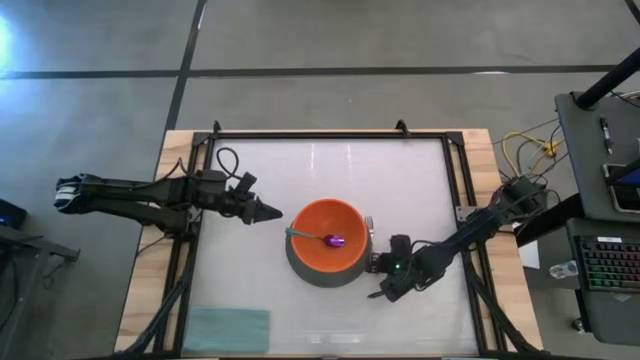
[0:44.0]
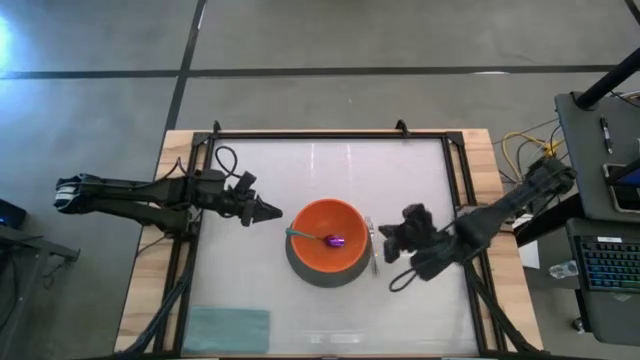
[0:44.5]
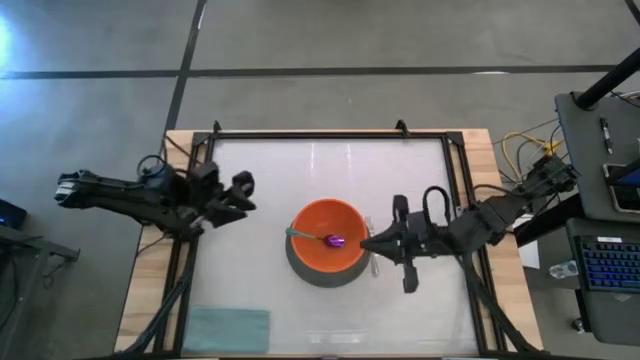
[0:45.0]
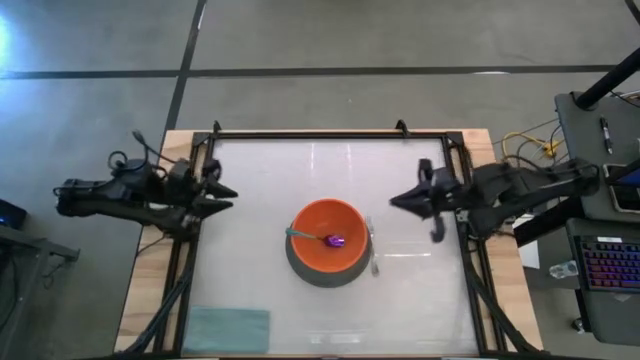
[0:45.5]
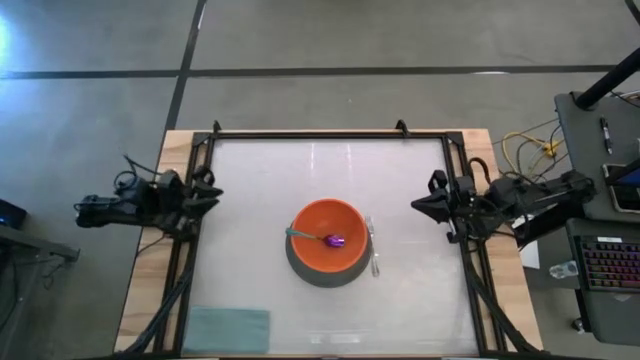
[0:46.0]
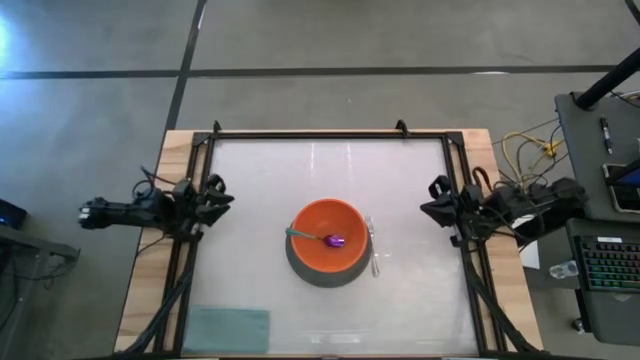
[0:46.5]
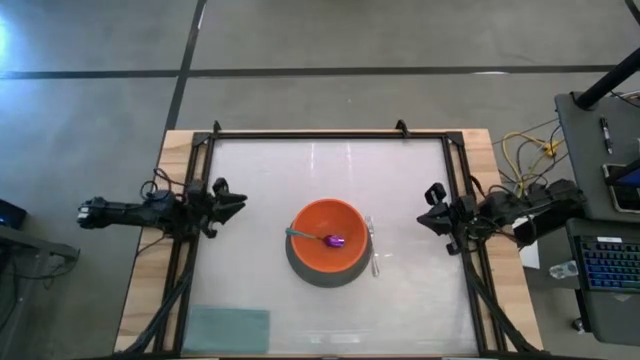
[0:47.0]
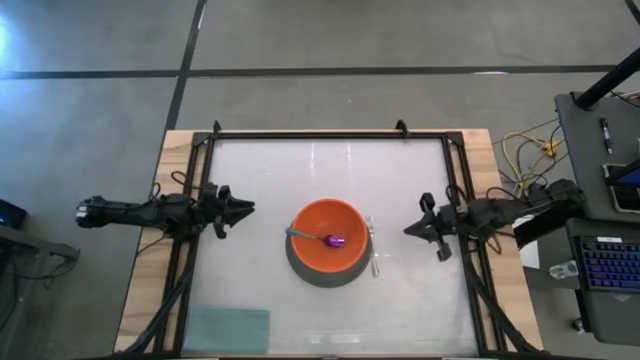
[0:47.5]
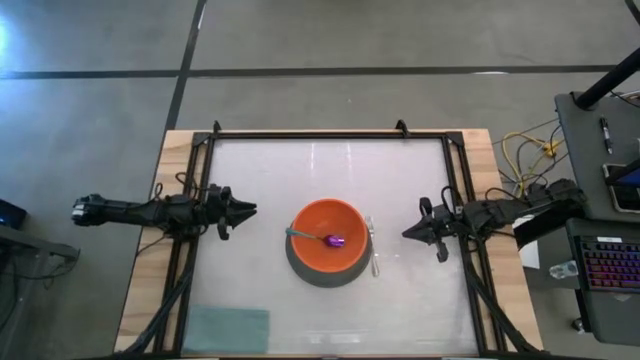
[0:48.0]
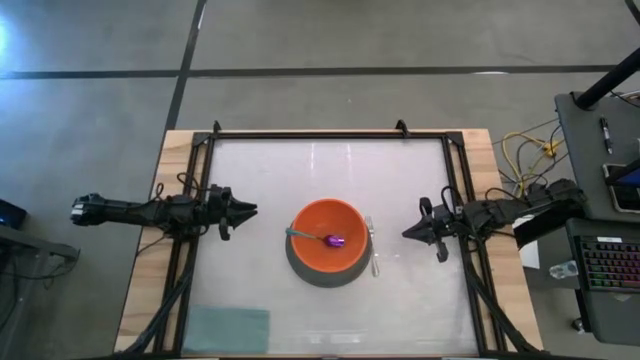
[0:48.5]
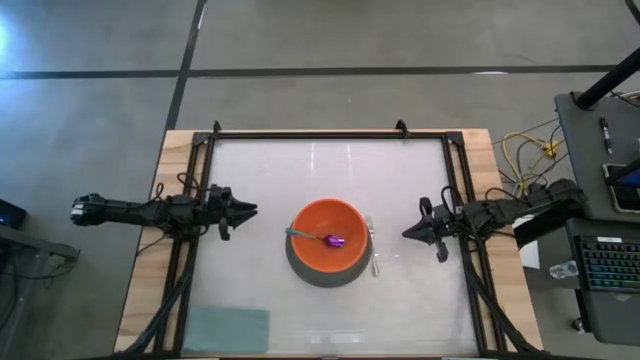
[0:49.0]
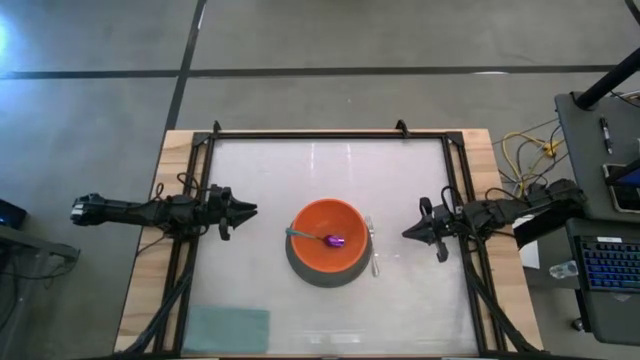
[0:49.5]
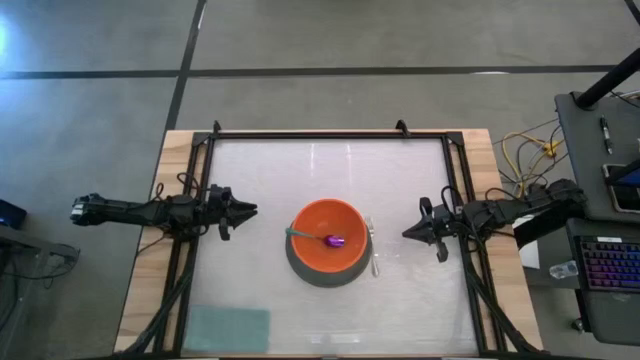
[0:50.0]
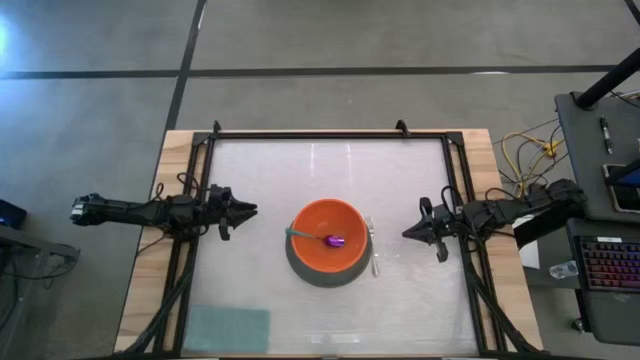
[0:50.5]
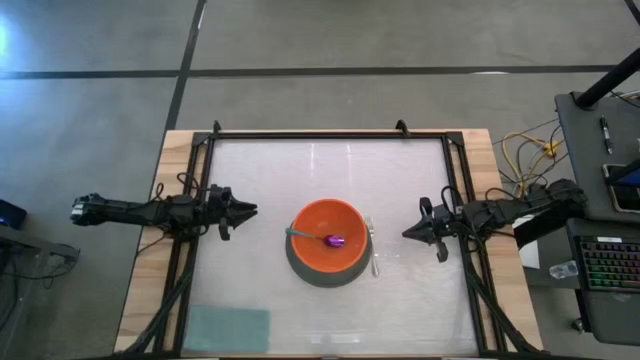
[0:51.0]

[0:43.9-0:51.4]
Task: Set table place
Return to Home Position

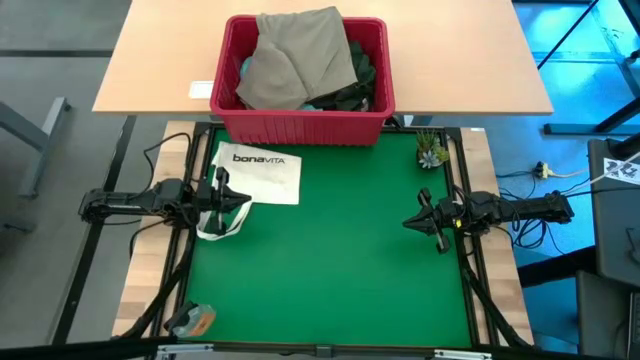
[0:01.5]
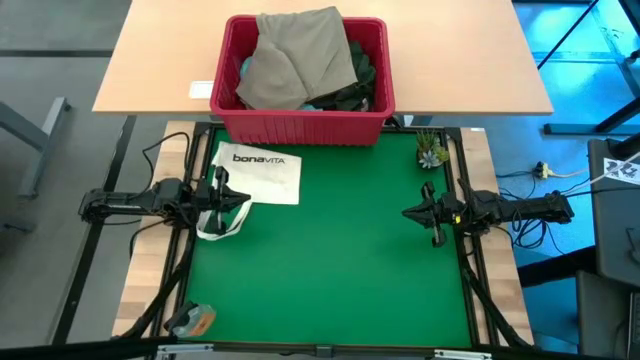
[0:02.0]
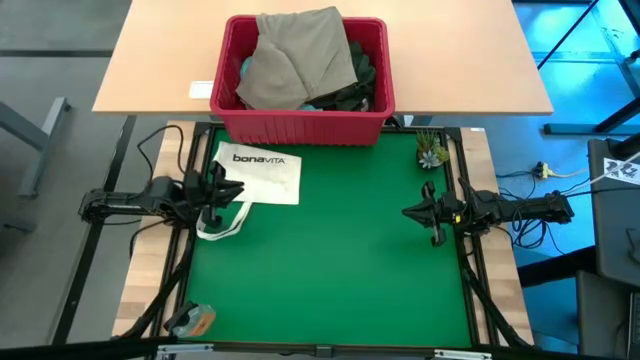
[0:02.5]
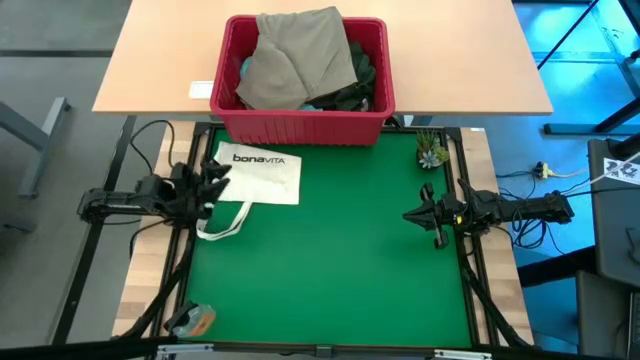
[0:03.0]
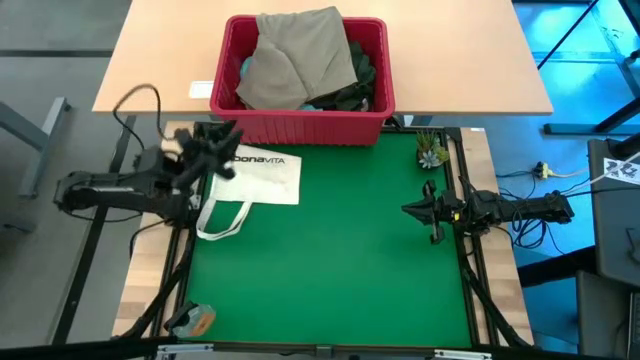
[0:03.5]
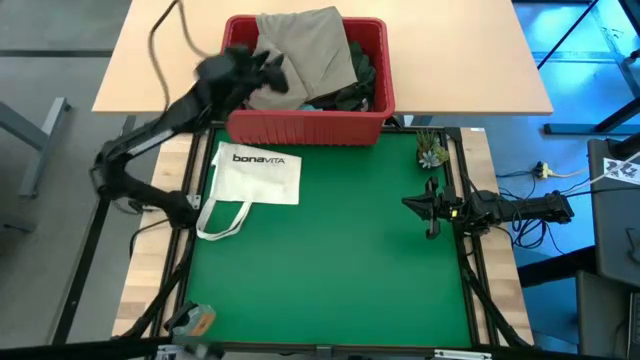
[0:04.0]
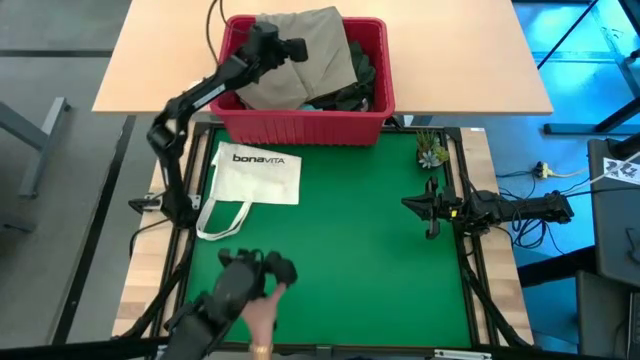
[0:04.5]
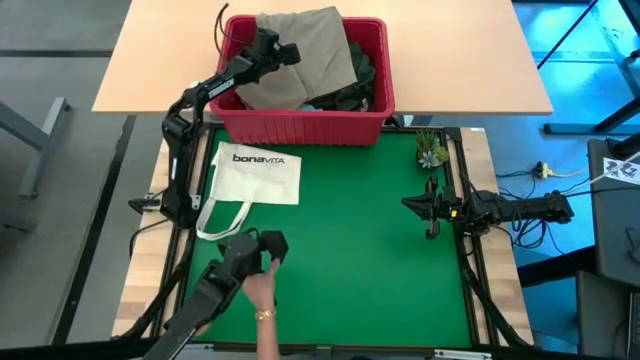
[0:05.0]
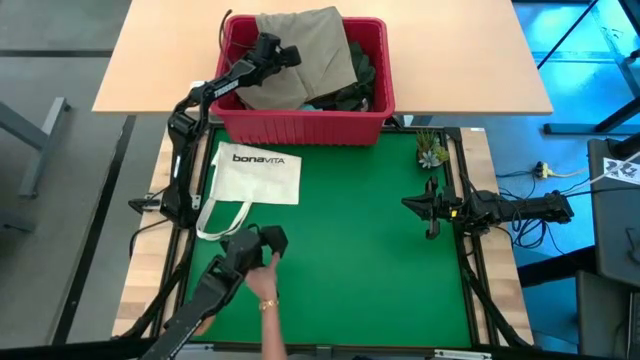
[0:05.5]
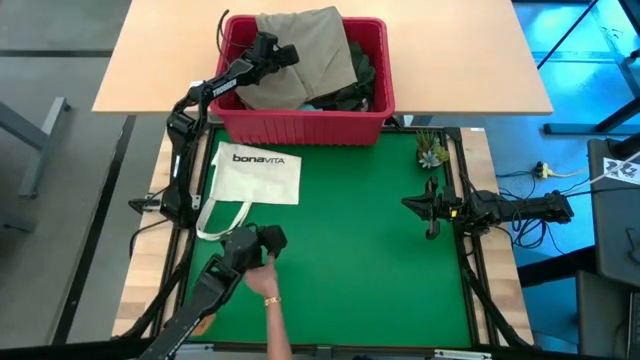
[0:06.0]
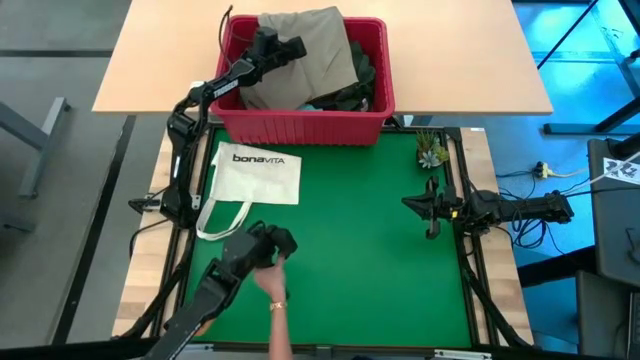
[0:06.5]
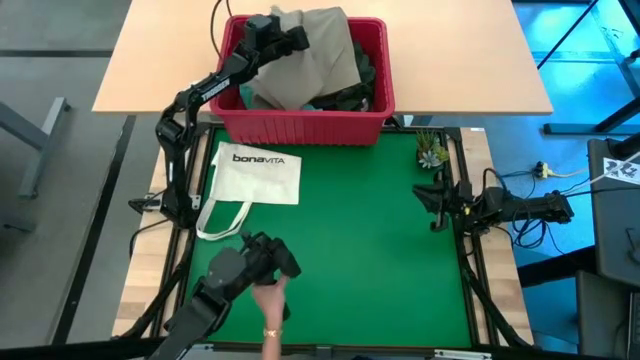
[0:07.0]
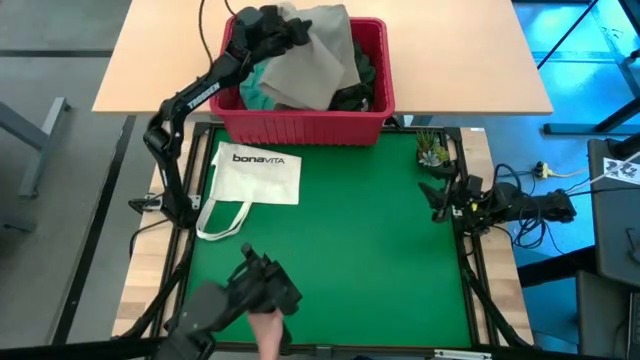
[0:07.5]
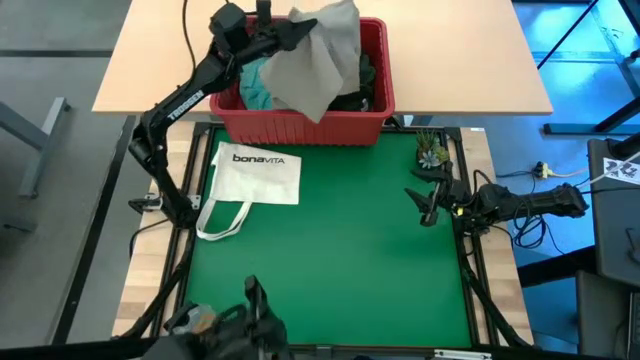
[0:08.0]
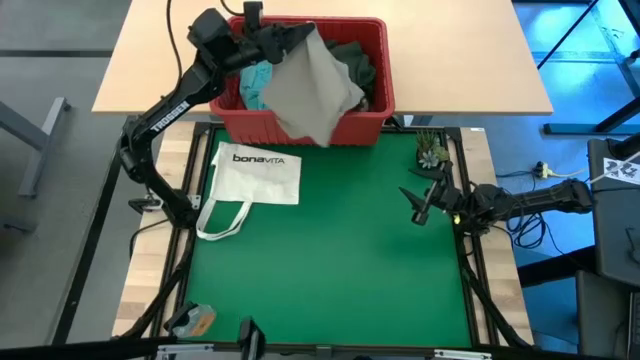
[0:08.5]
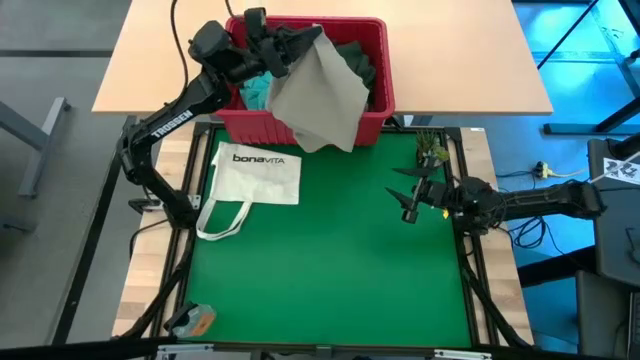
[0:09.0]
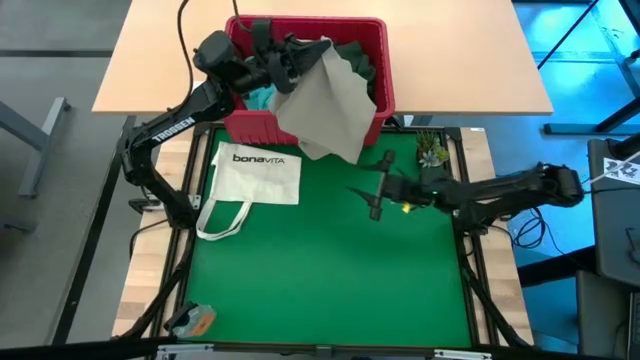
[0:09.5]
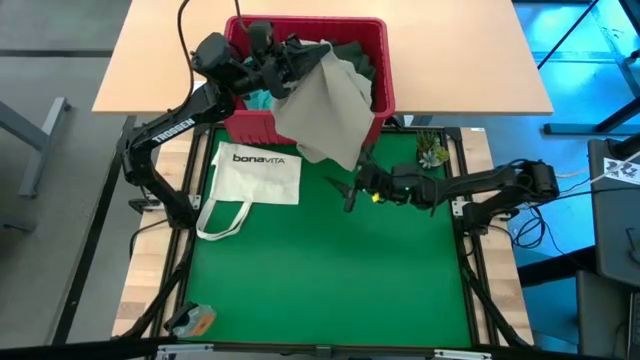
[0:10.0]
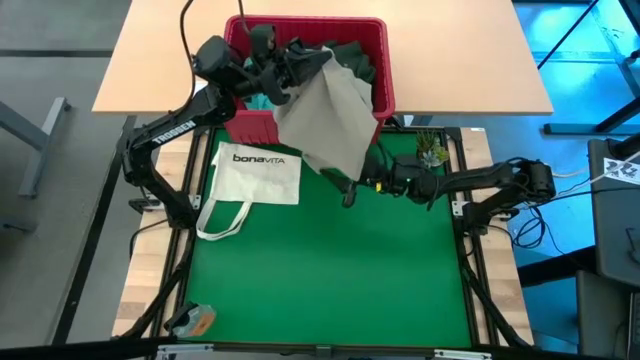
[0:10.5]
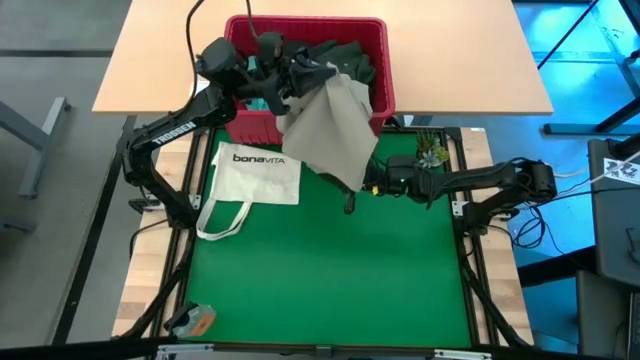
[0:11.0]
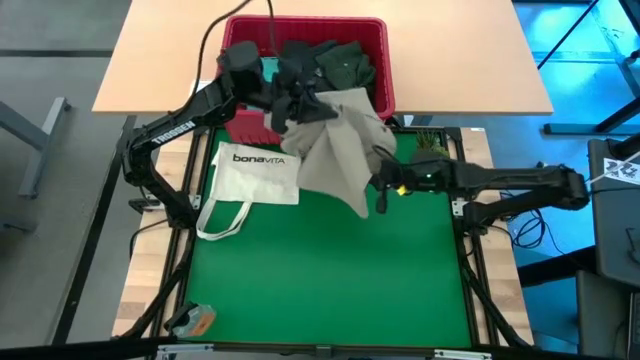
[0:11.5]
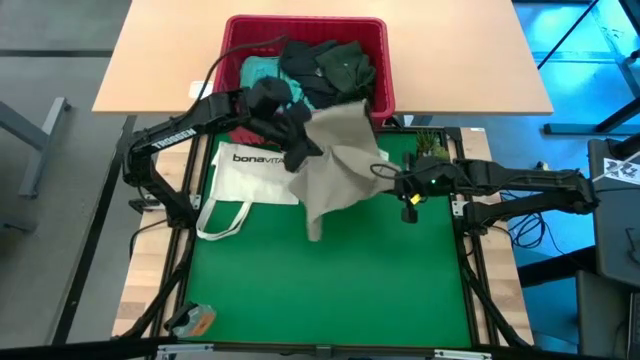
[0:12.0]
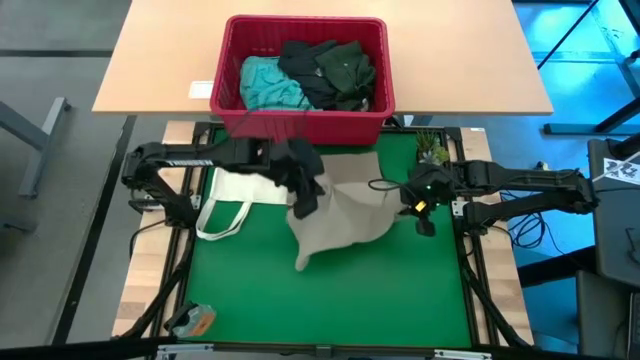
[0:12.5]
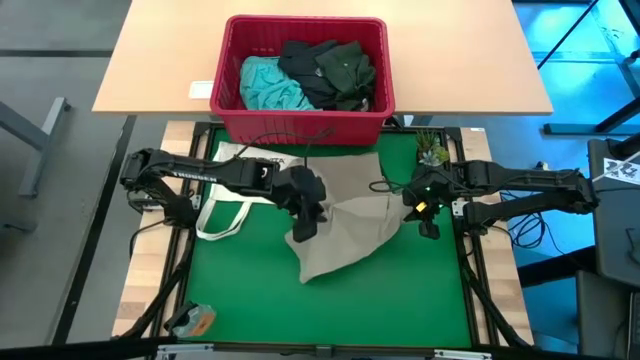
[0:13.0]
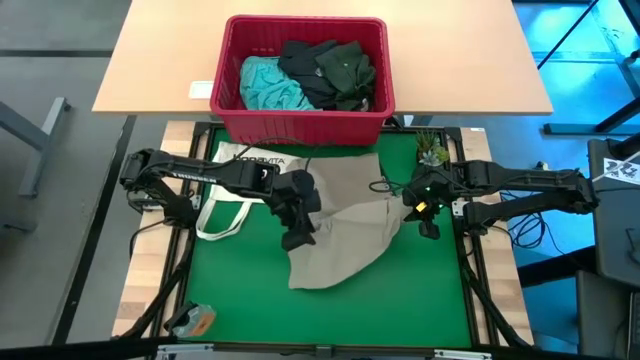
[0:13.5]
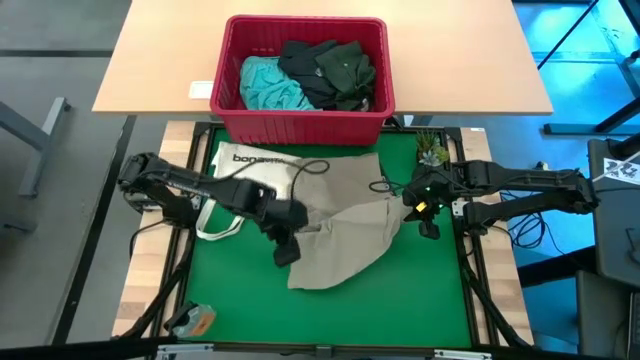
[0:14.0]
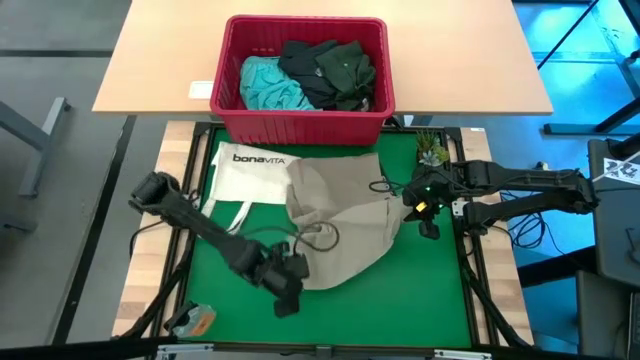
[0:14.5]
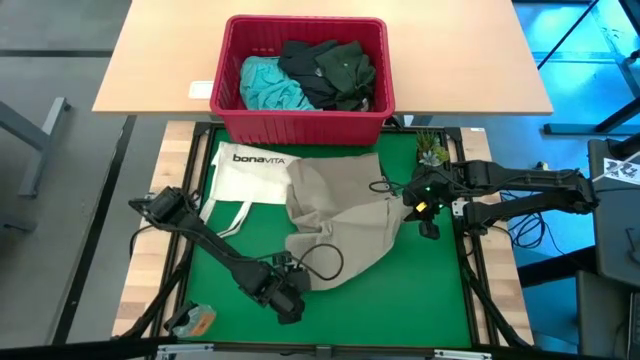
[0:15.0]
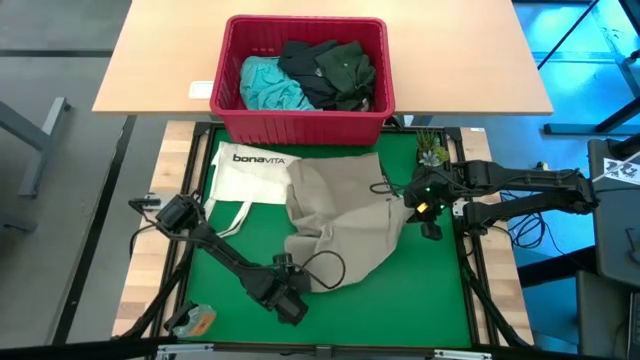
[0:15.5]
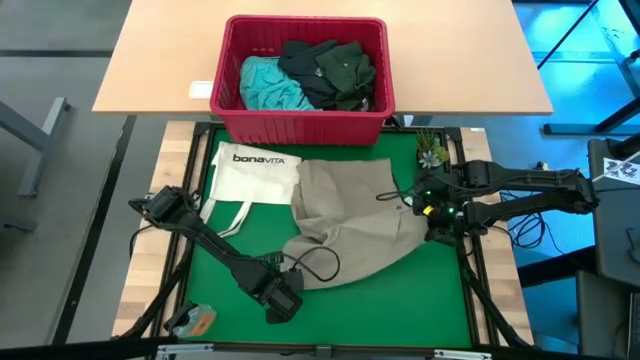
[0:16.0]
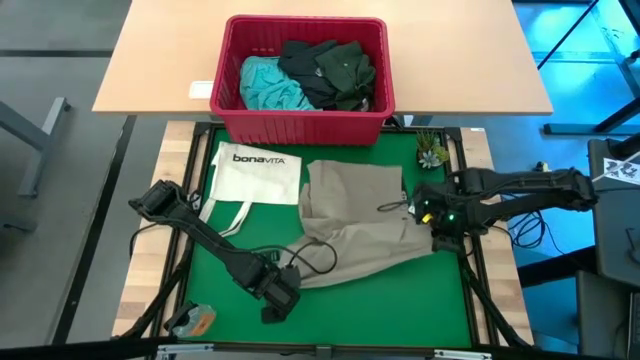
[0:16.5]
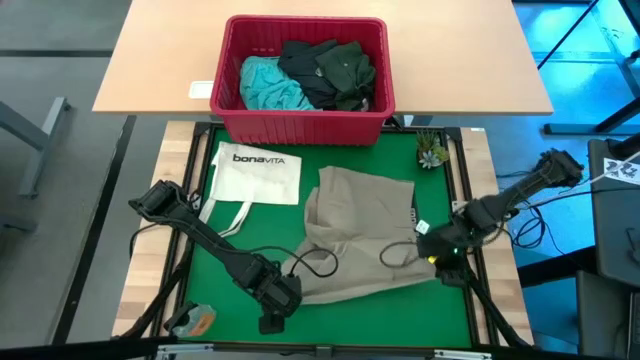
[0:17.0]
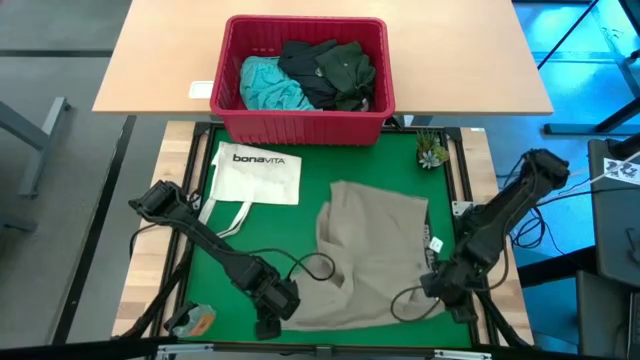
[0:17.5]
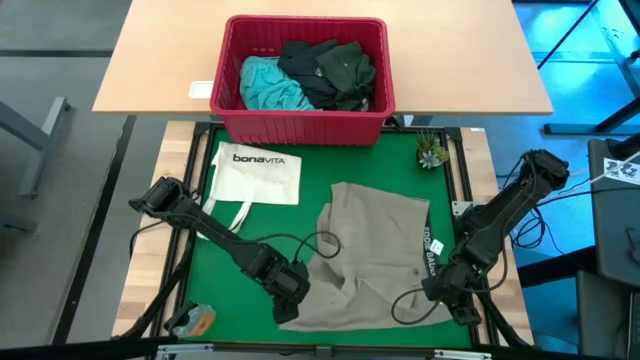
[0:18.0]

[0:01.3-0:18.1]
Task: Fold Laundry from Bin
Remove the light brown shorts from the red laundry bin
